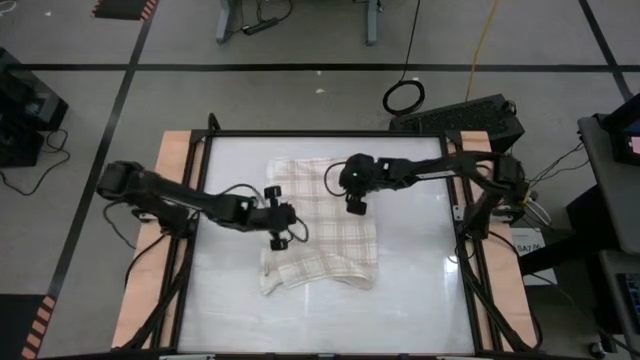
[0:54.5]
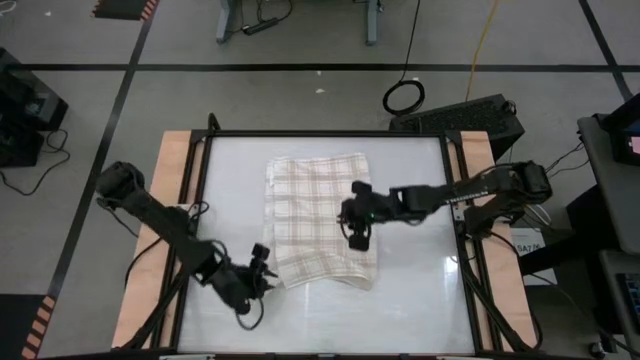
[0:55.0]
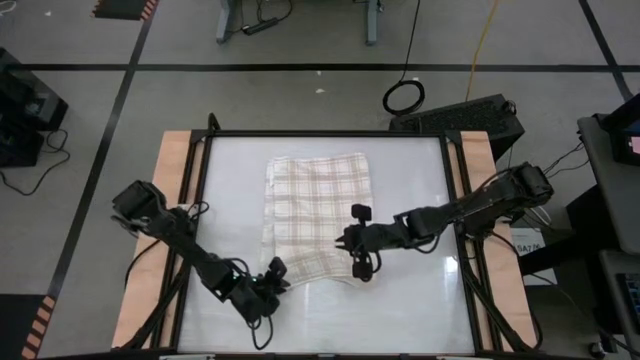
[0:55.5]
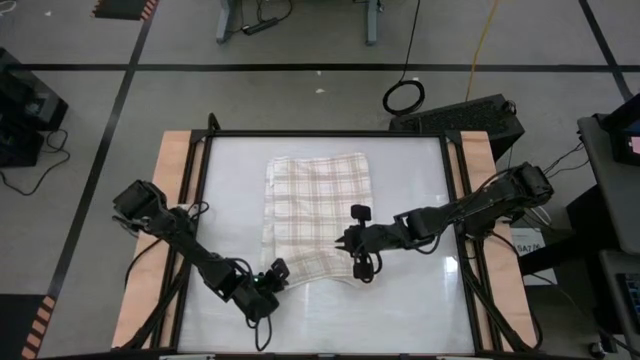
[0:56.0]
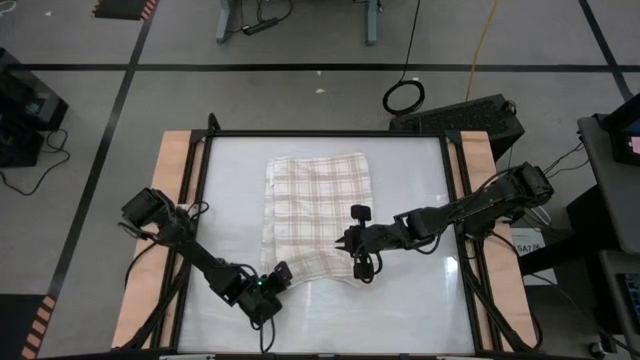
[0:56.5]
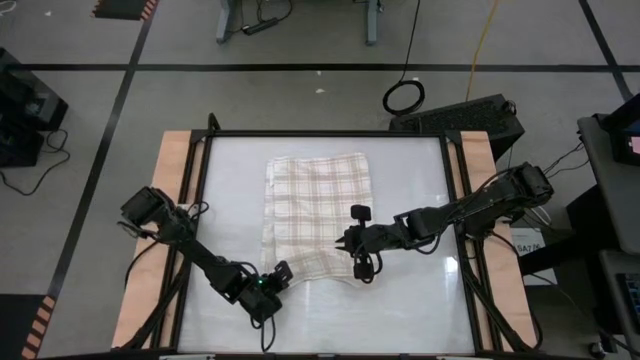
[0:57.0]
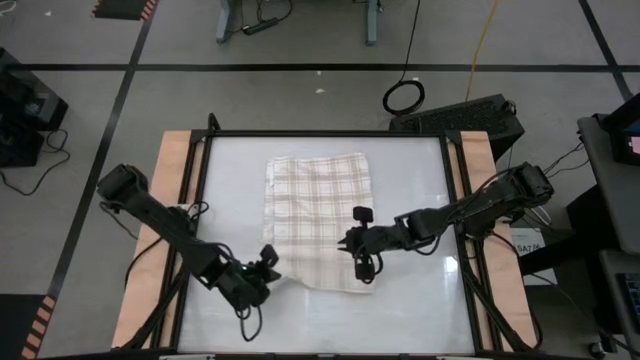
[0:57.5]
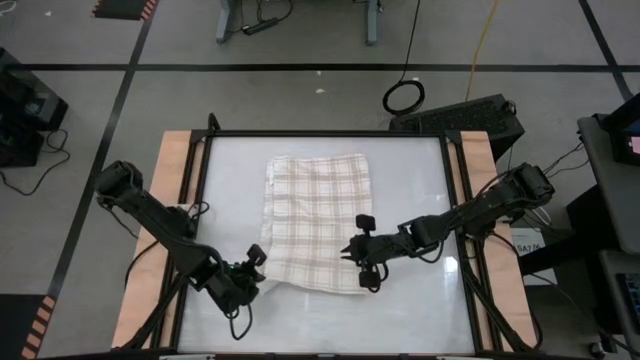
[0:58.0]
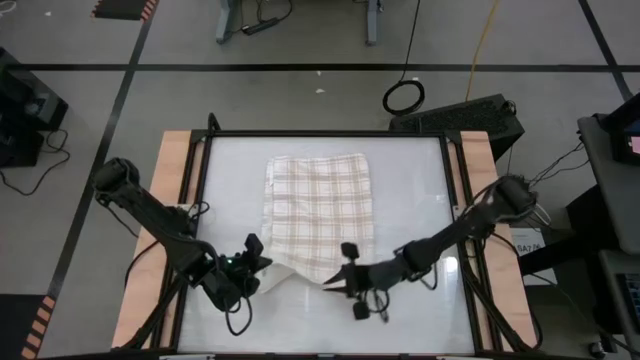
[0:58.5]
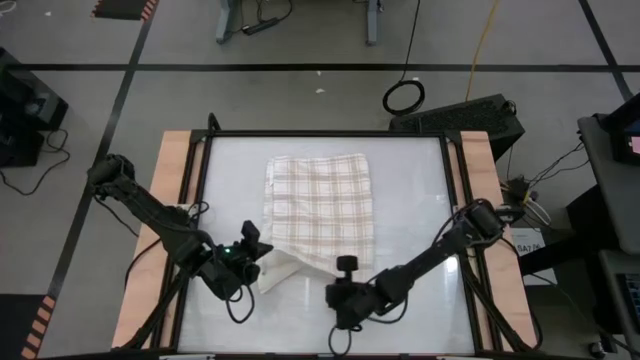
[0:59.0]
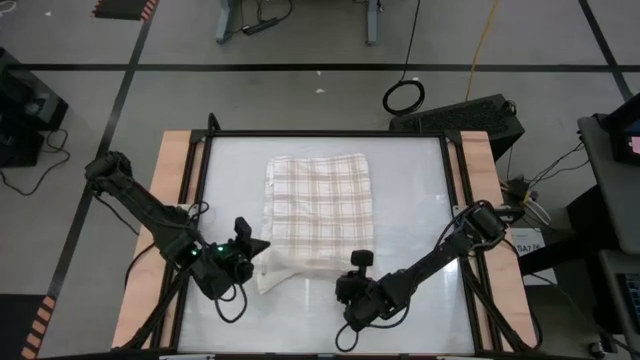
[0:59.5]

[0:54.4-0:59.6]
Task: Roll towel
Roll the white towel

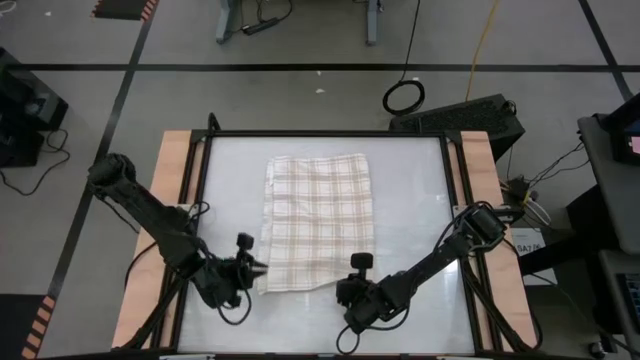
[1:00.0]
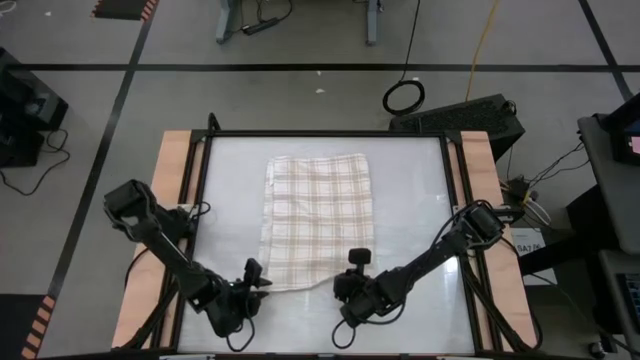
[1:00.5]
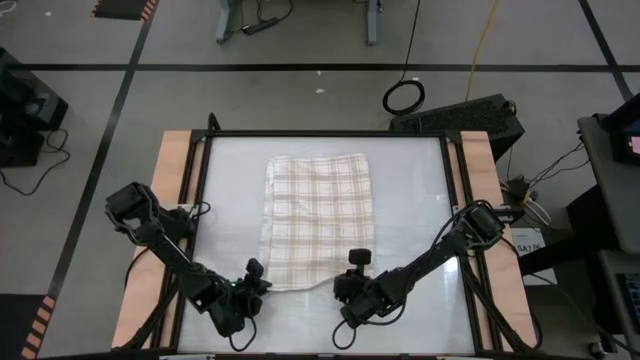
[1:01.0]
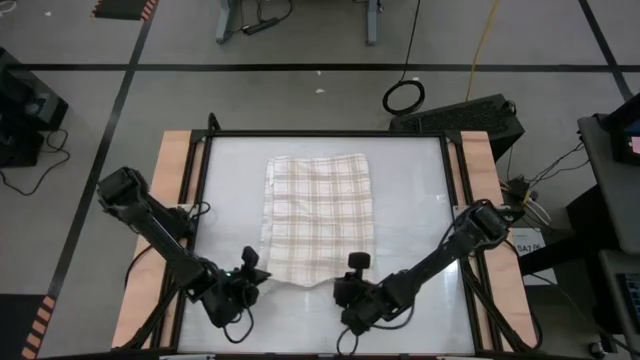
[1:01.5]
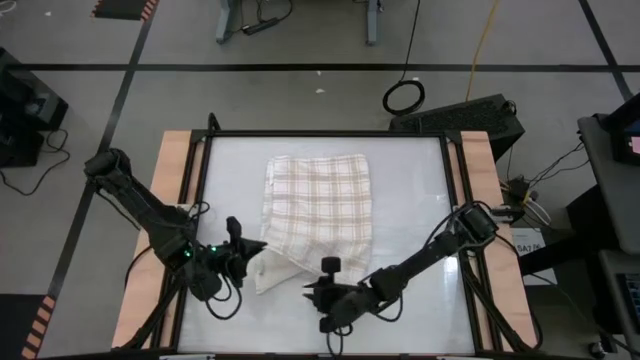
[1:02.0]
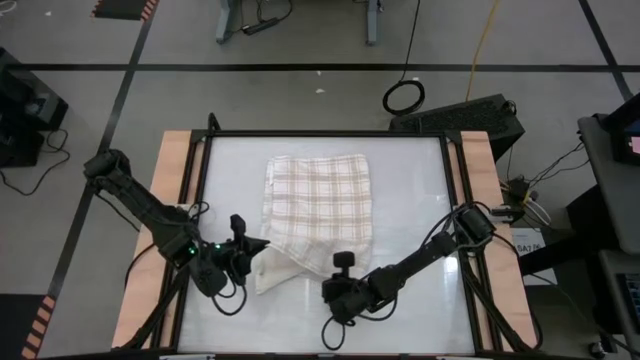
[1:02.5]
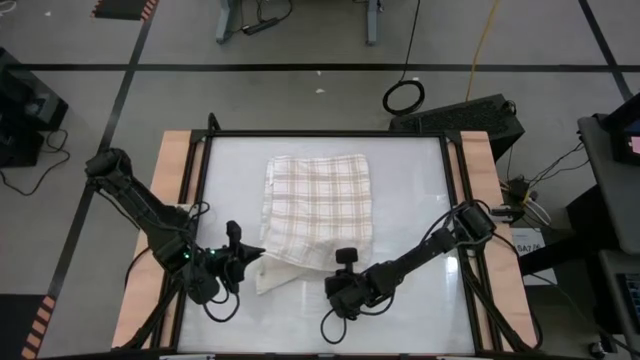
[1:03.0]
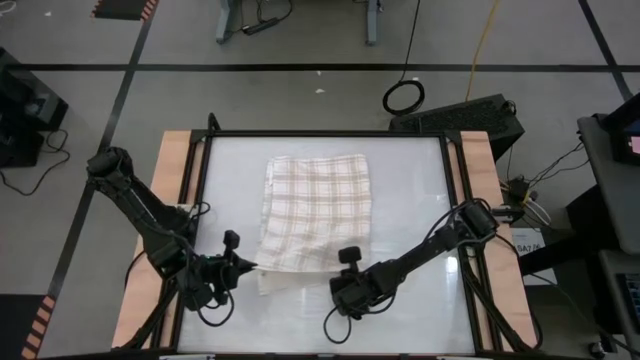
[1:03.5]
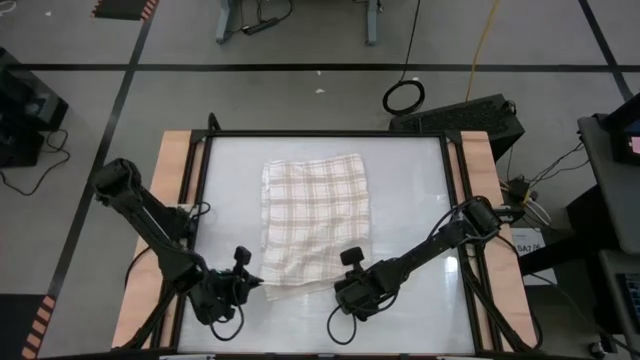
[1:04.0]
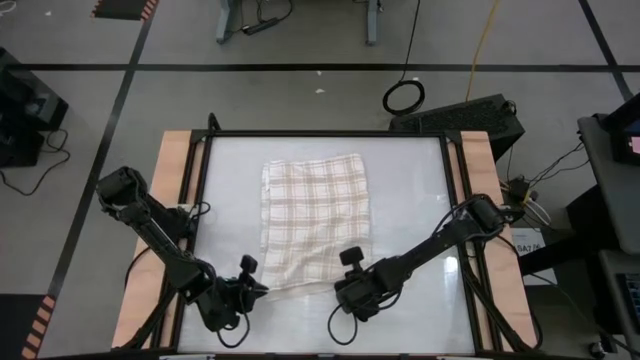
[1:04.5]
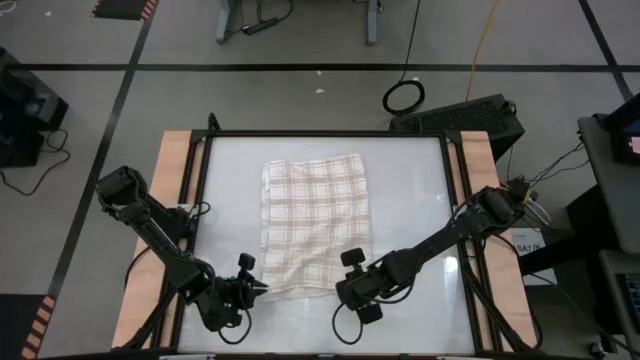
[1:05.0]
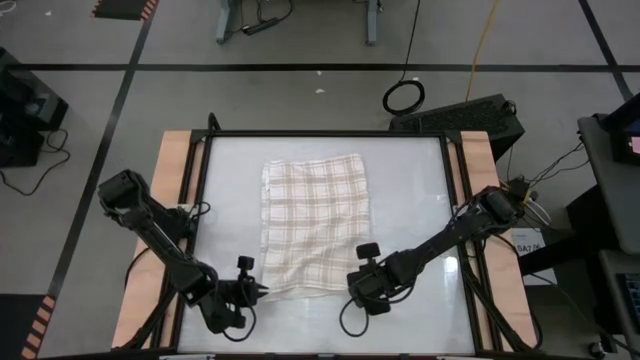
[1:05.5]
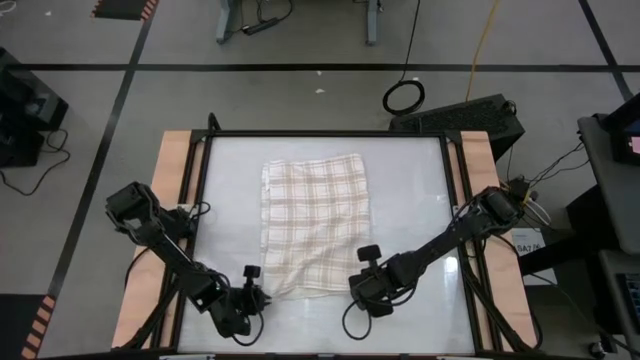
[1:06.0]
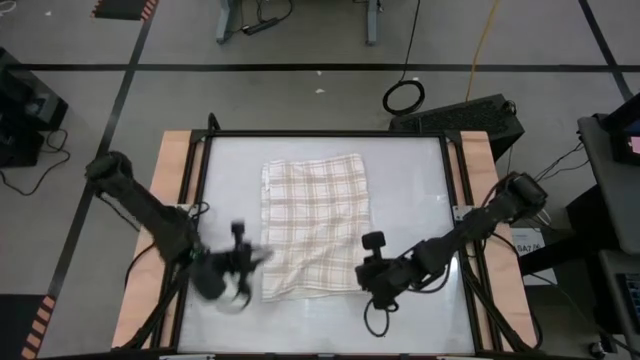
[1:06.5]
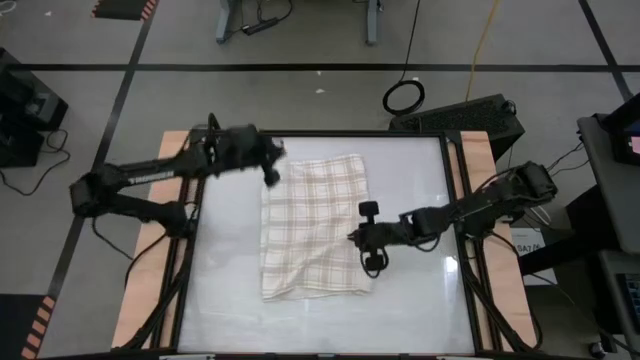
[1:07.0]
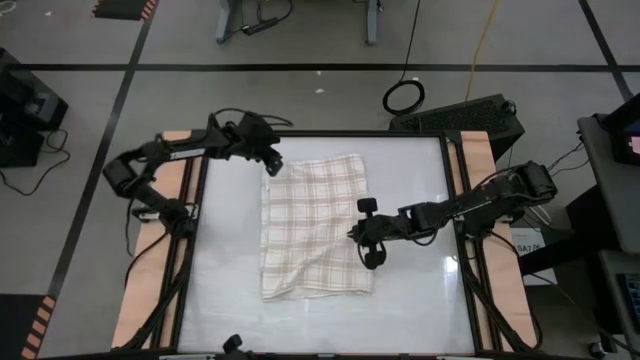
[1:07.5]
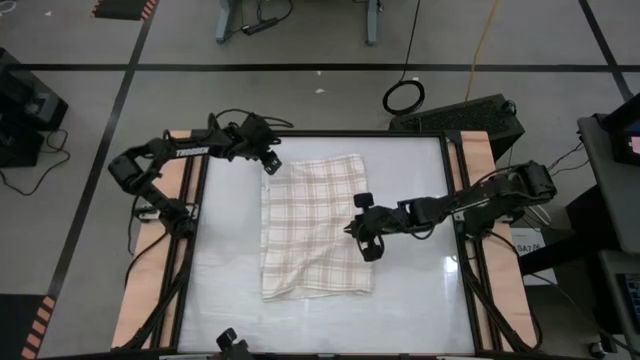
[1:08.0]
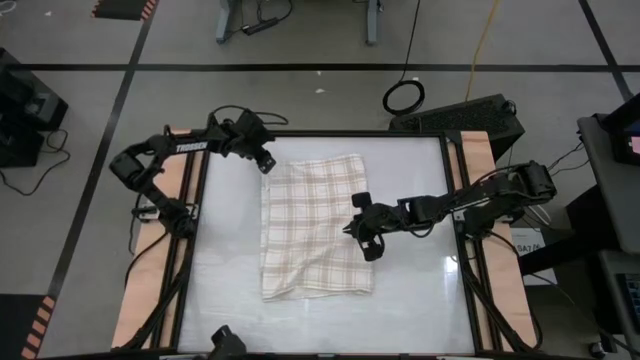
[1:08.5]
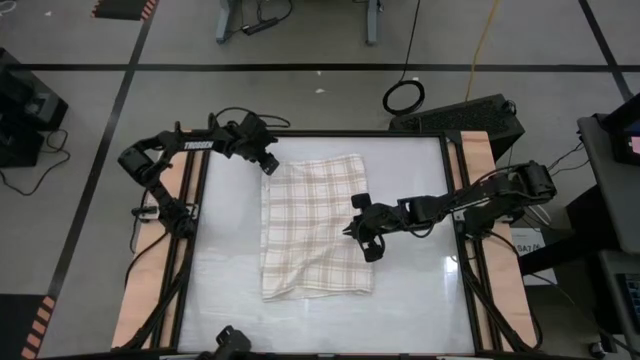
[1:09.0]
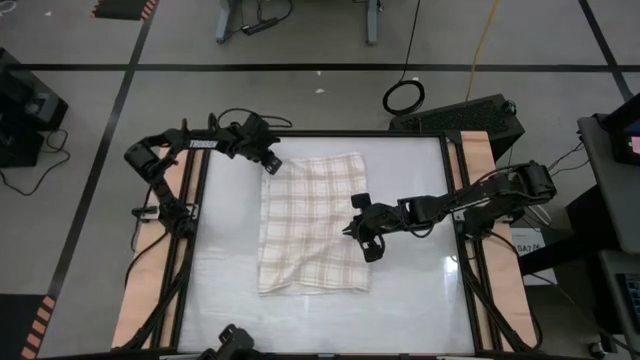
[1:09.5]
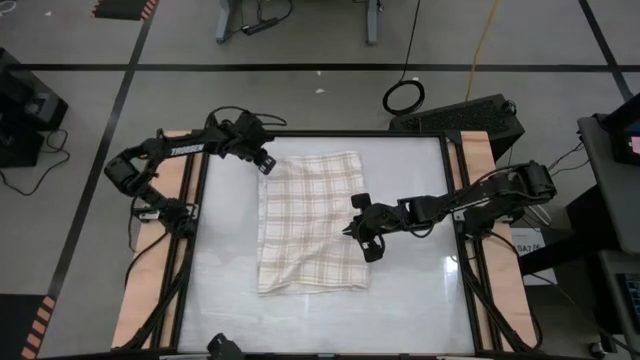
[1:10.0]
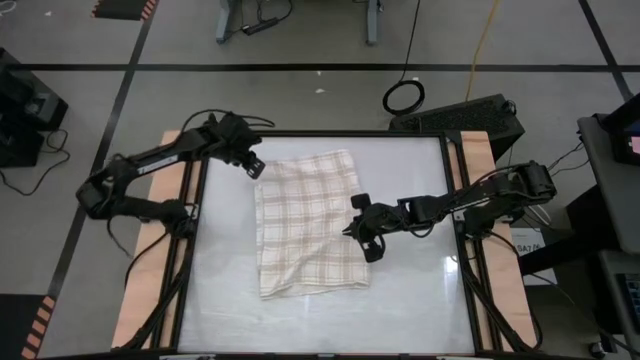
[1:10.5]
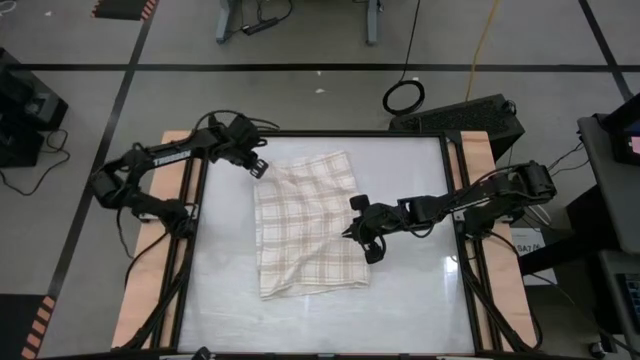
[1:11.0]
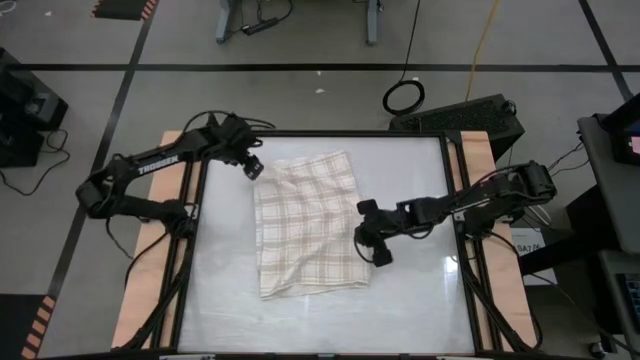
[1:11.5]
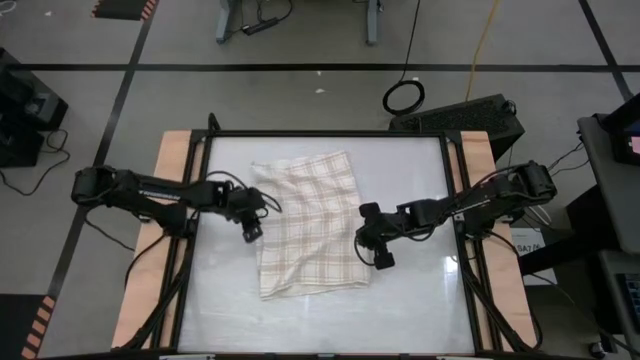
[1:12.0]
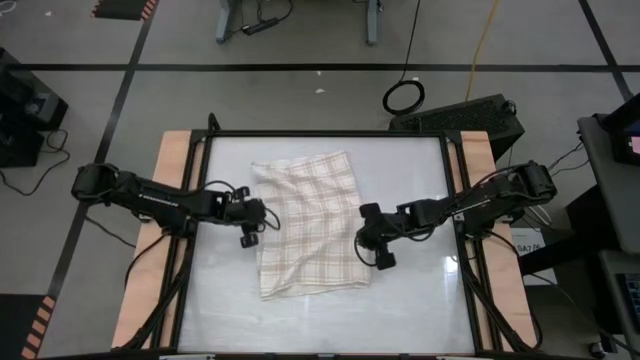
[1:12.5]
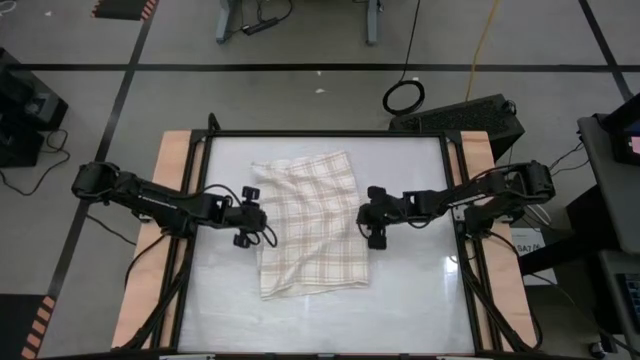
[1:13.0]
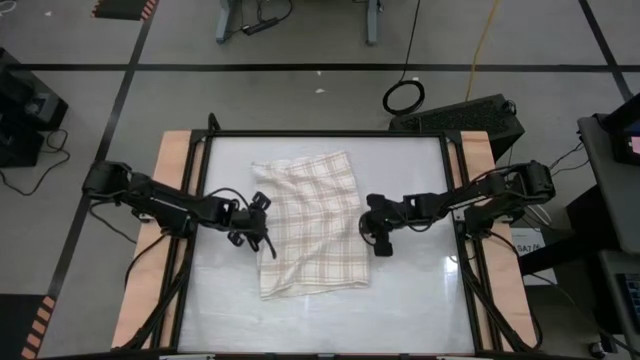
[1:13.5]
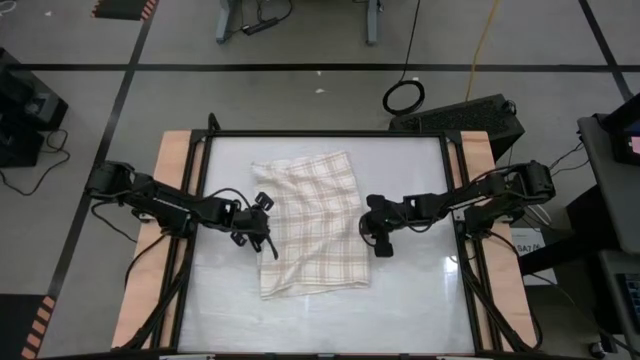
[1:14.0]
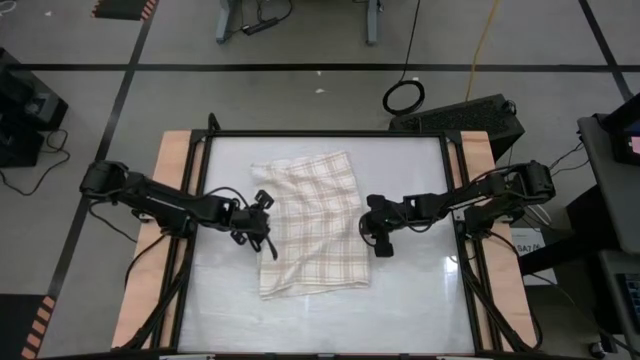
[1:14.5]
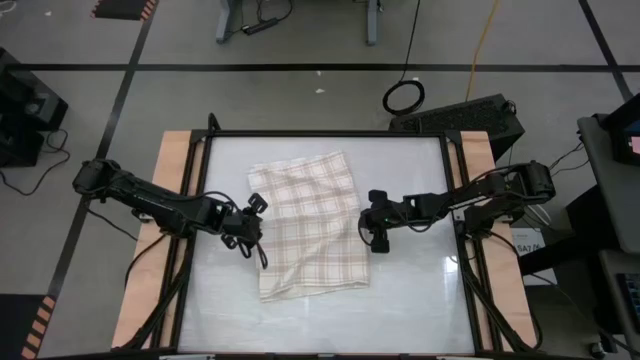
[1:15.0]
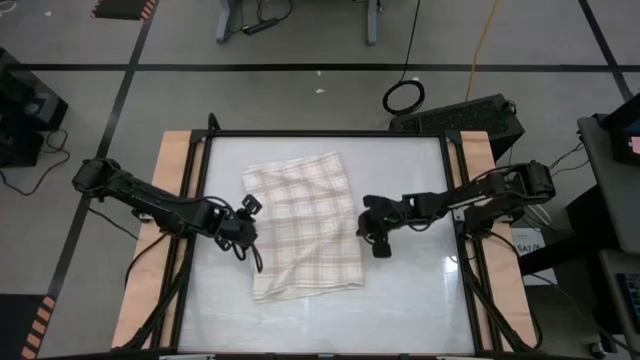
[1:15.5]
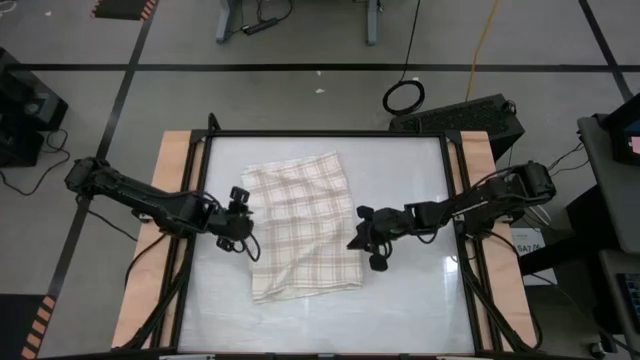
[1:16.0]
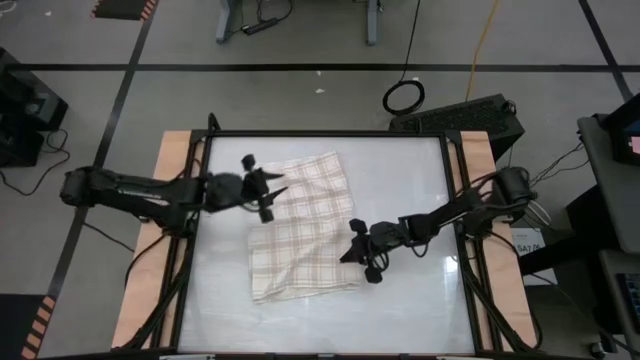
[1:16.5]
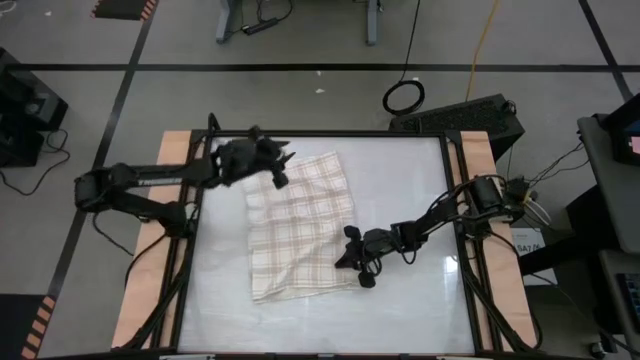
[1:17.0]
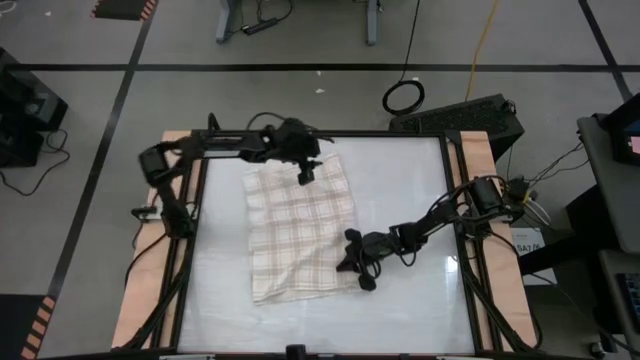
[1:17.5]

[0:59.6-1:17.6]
Roll the white towel
